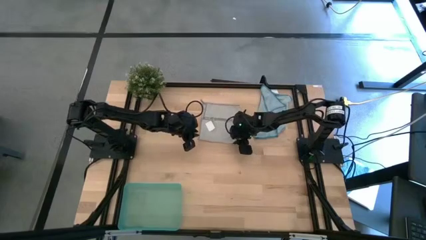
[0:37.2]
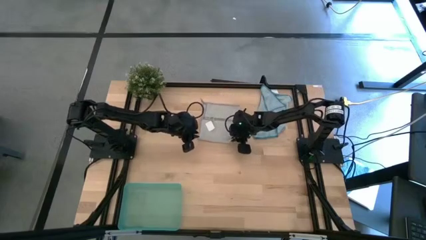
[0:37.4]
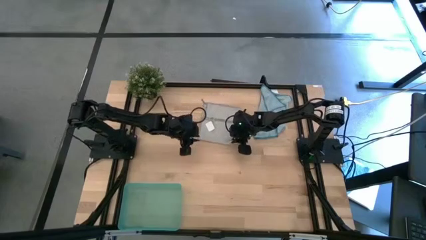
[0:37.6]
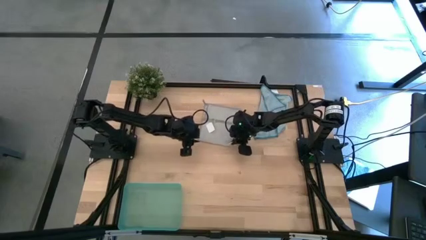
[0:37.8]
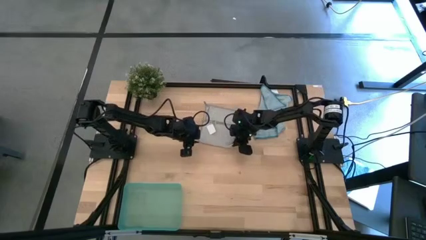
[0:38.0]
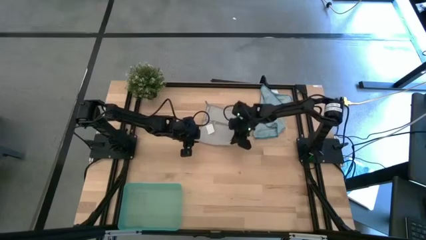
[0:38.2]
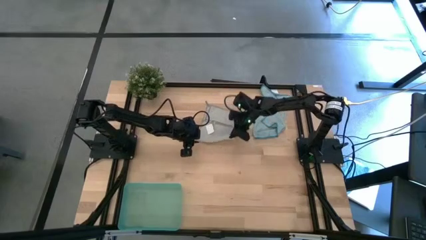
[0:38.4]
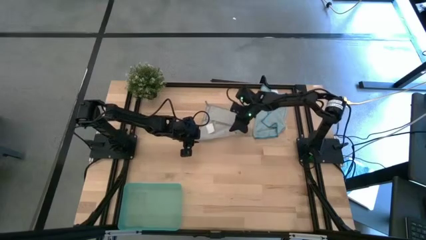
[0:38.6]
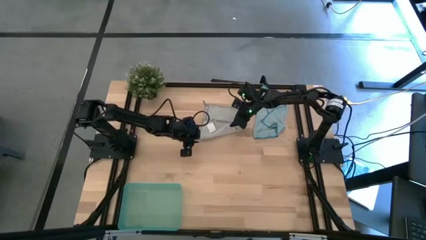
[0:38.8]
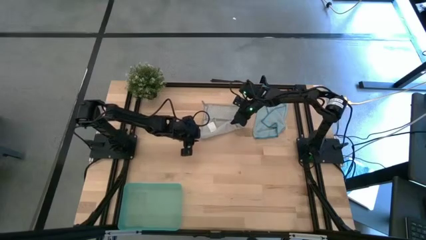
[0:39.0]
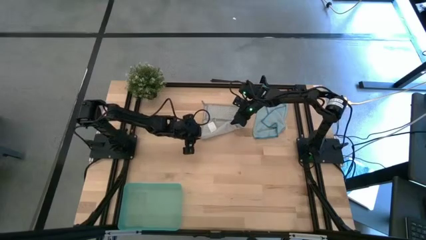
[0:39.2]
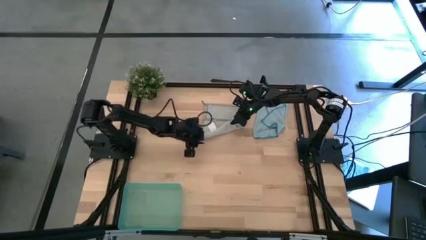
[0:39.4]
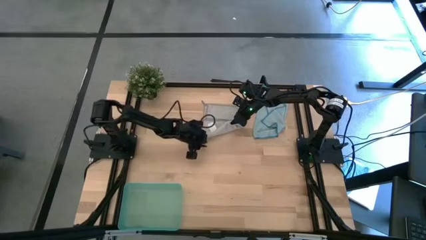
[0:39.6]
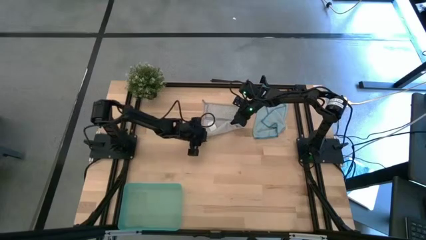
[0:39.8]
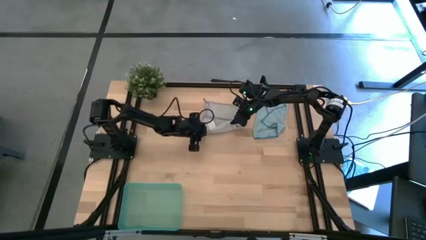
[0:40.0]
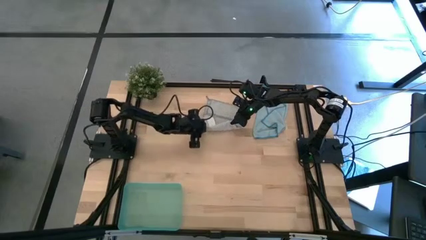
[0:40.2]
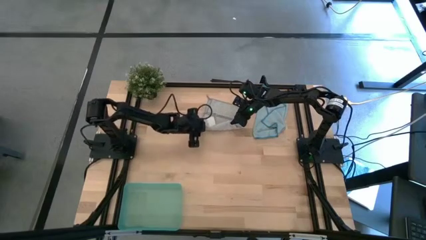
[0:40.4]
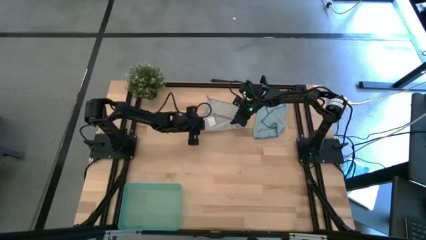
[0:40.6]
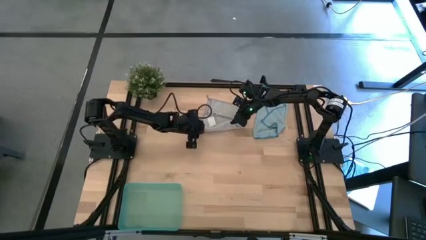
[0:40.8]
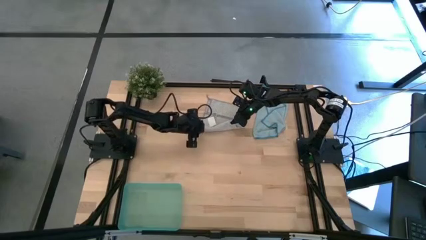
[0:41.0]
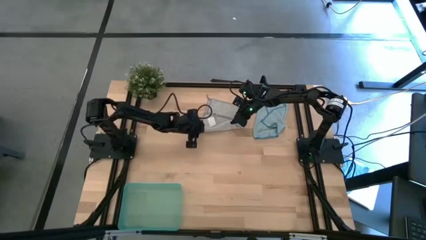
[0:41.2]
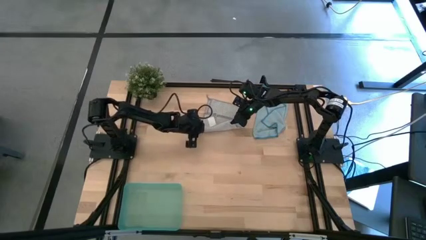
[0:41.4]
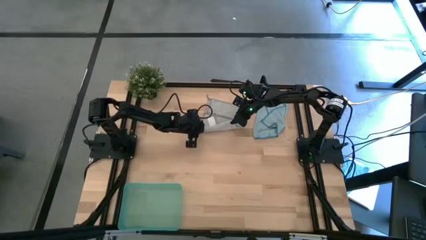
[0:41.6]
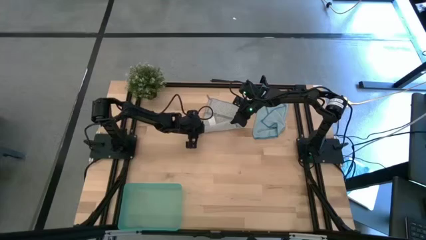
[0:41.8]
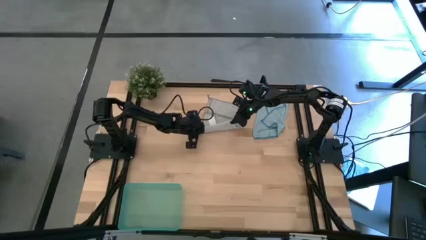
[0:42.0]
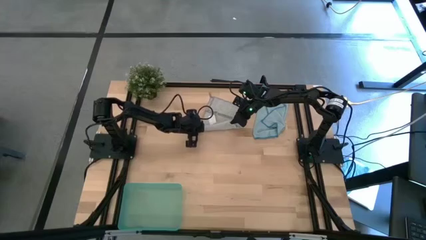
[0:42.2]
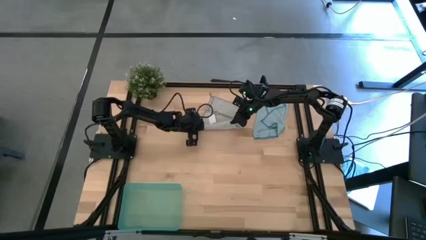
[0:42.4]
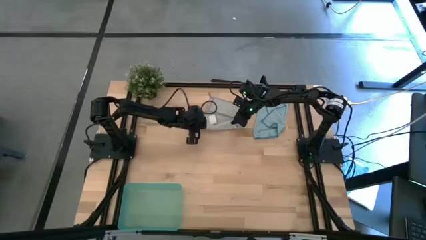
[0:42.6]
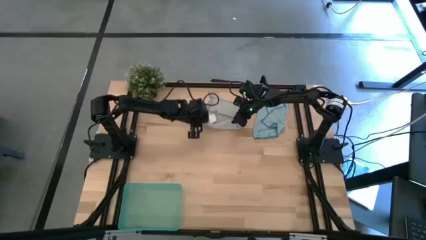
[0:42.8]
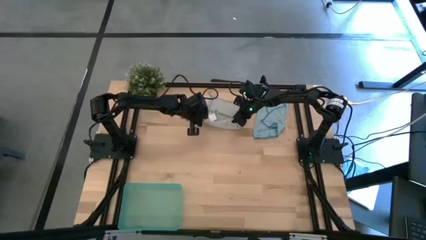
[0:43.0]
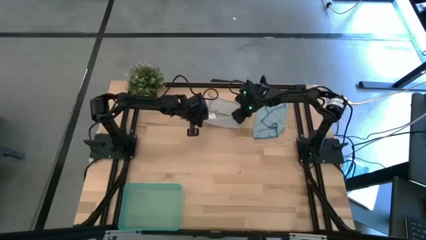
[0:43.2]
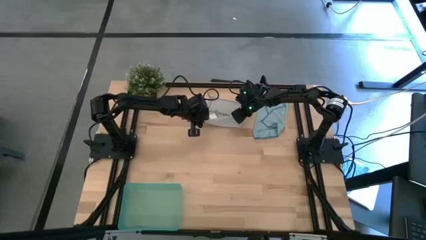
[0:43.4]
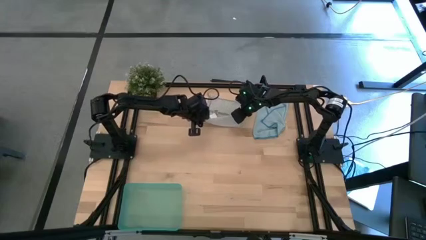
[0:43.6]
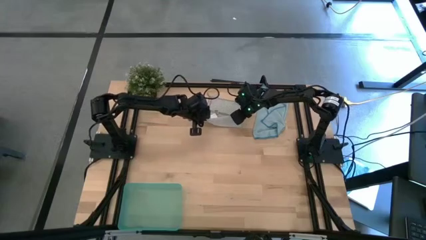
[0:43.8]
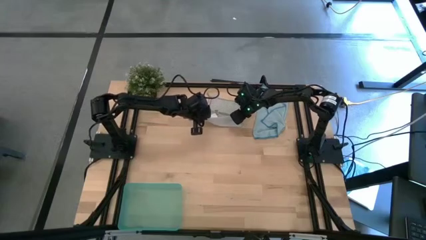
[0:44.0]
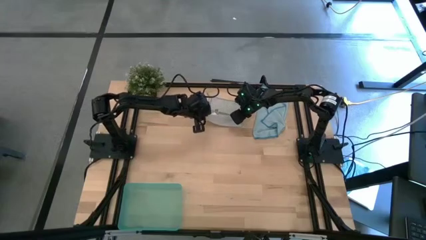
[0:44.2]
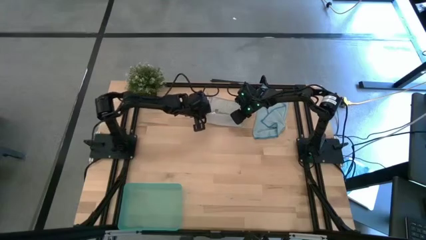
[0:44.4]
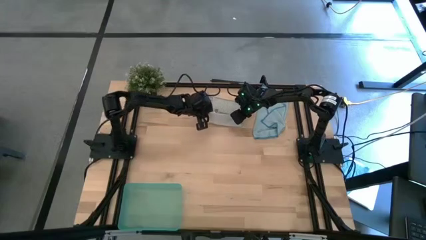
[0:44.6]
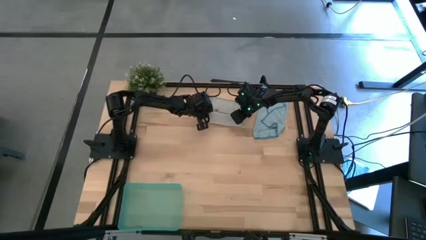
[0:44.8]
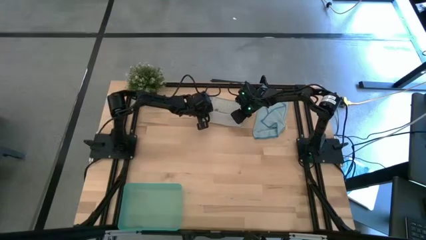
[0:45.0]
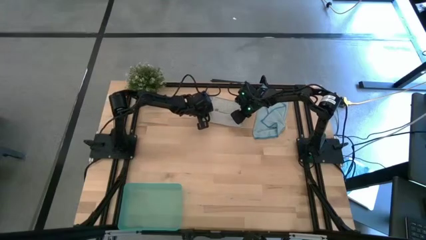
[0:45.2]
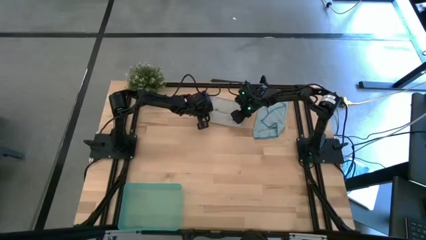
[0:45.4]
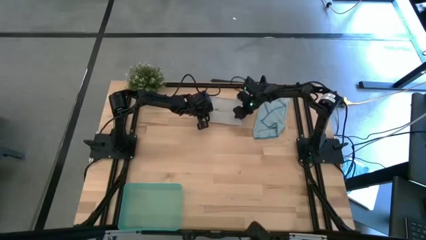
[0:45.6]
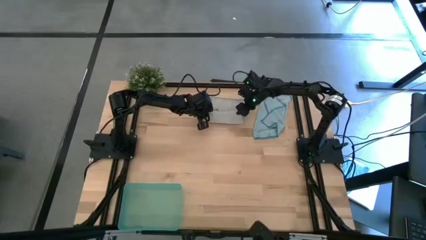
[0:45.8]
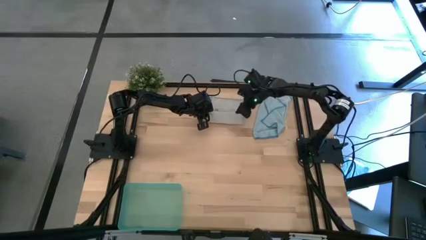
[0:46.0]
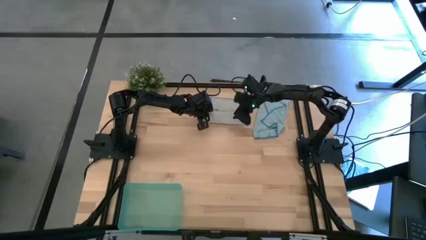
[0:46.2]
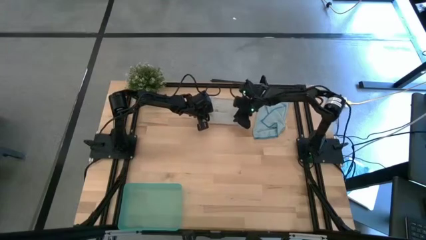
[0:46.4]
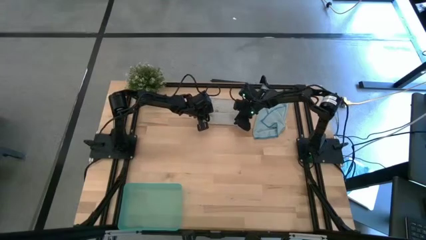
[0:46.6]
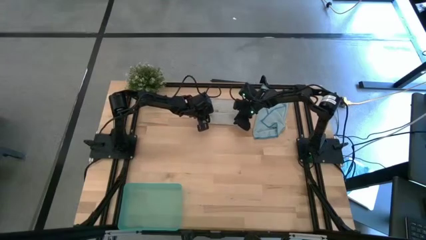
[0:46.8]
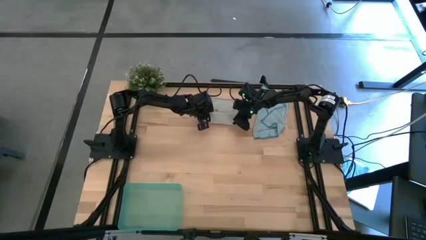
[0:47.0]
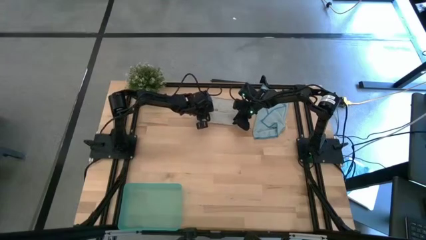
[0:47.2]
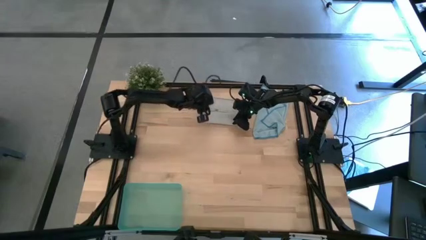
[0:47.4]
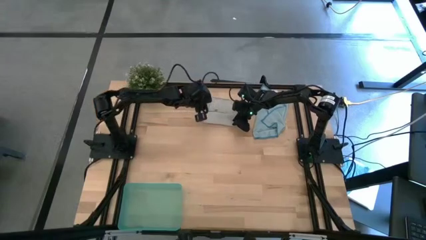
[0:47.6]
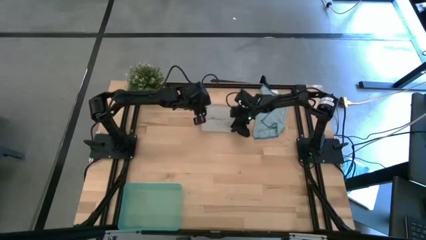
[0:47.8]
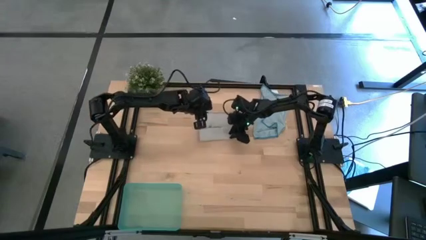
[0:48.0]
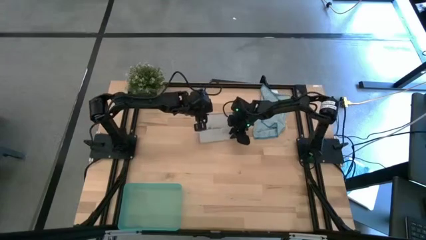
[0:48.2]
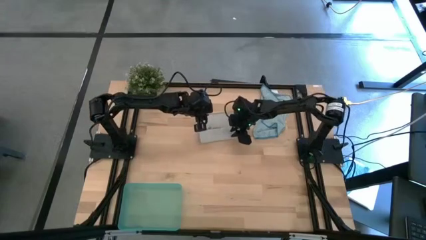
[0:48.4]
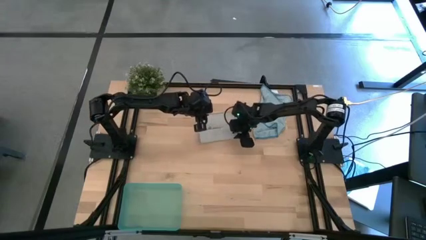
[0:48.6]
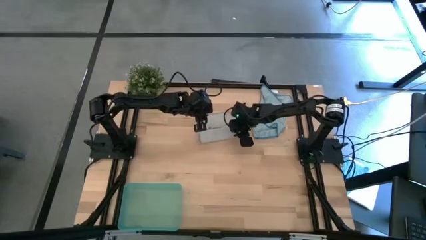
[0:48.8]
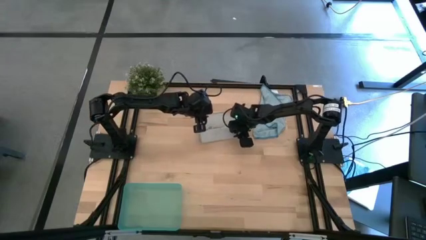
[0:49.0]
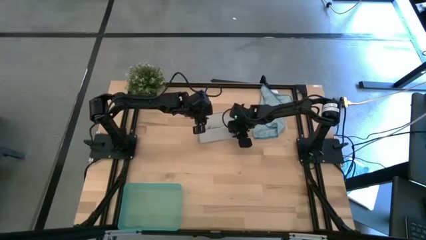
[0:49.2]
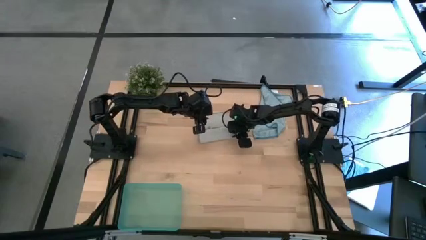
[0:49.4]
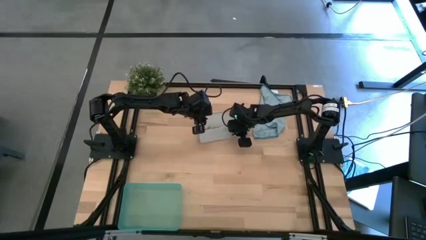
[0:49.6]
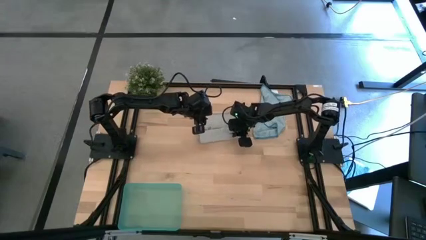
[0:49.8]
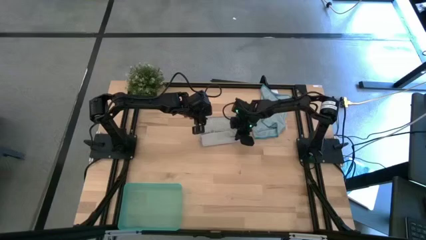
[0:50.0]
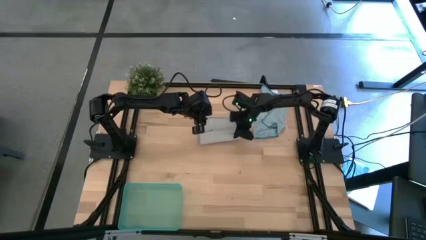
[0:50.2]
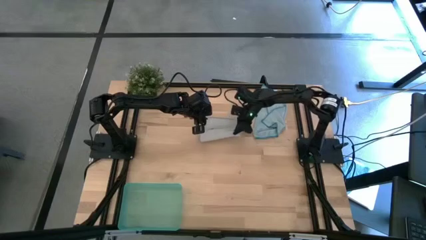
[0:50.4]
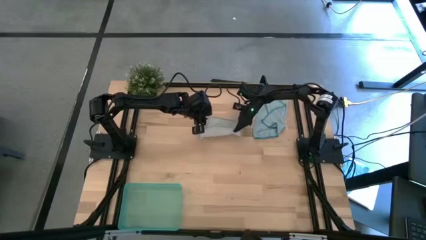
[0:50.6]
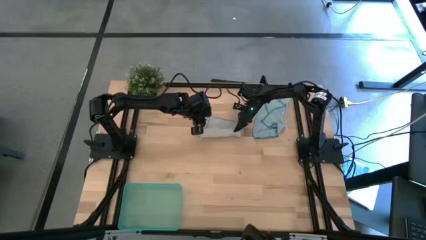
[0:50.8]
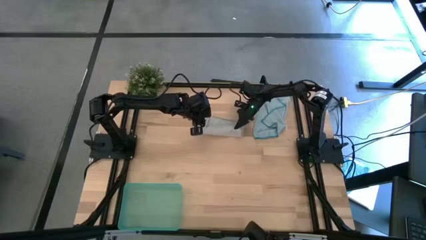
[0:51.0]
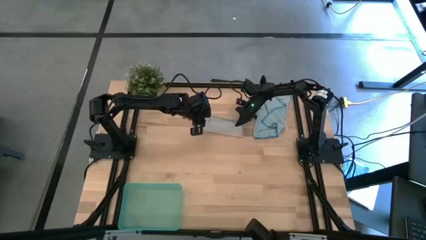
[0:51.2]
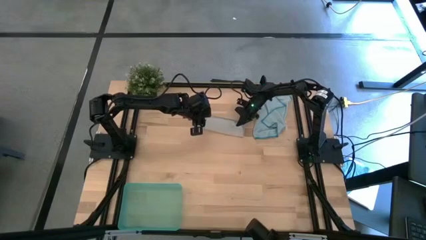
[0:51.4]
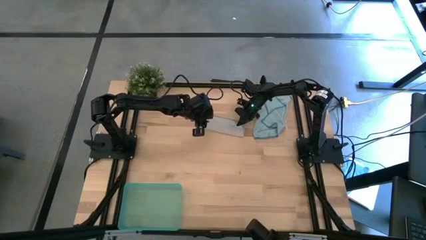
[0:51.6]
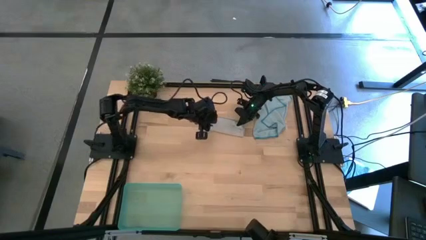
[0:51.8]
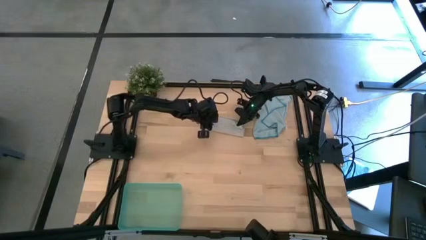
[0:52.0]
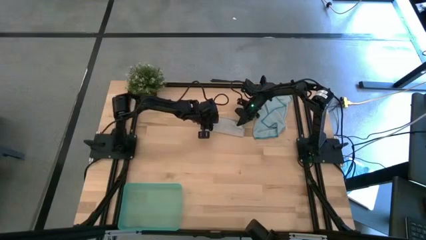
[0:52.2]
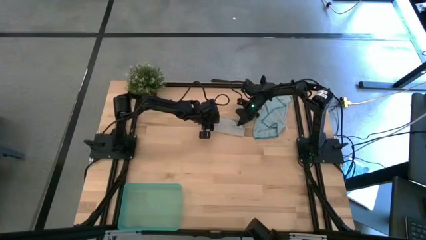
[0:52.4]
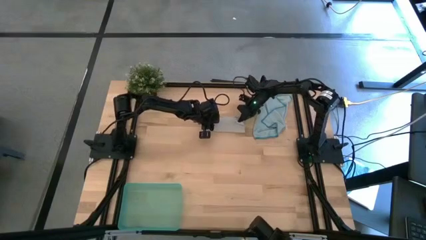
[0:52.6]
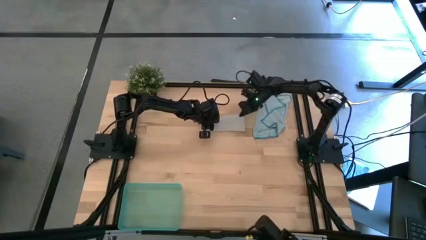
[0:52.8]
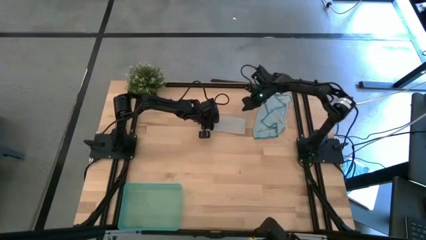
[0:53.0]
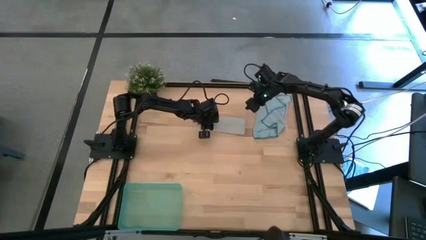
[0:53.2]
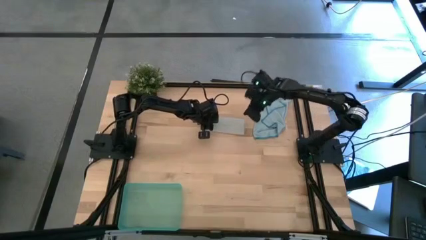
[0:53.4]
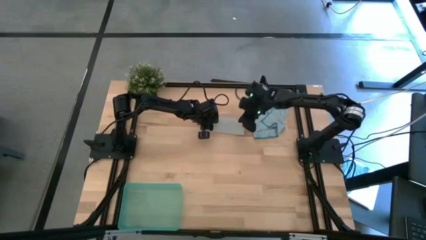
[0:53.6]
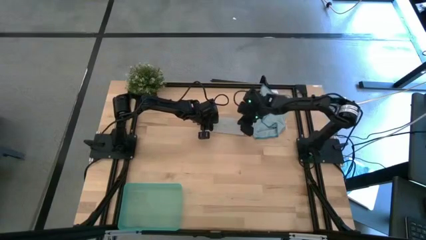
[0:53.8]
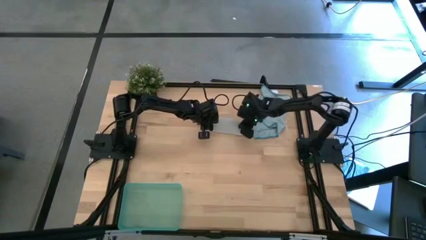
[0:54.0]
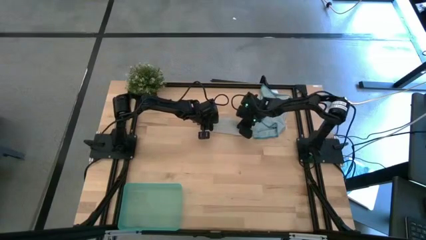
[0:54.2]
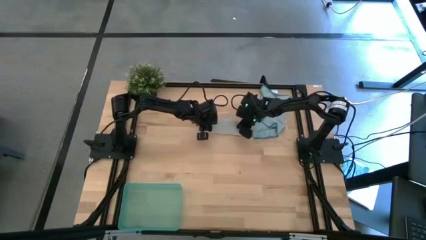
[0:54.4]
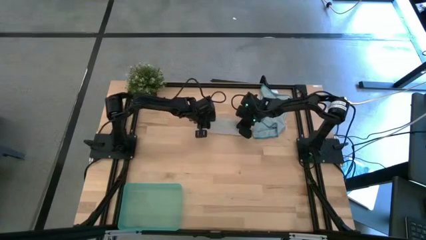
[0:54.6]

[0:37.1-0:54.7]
Task: Roll microfiber towels into tight, uniform cylinder then place into a basket
Roll the gray microfiber cloth
